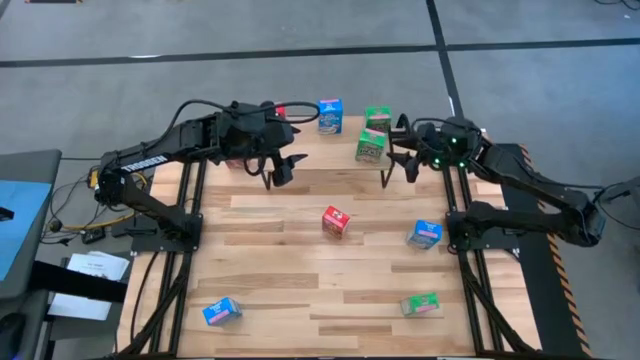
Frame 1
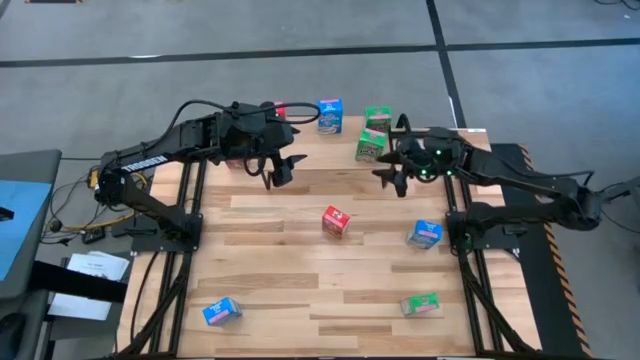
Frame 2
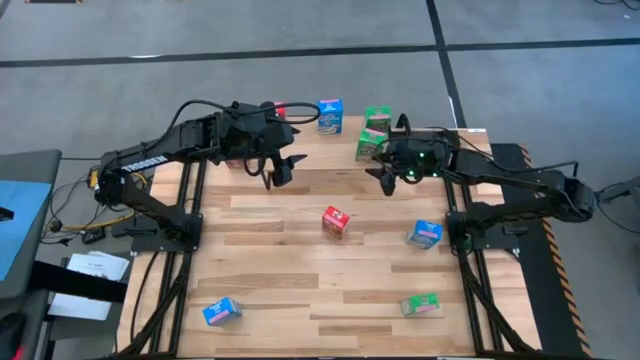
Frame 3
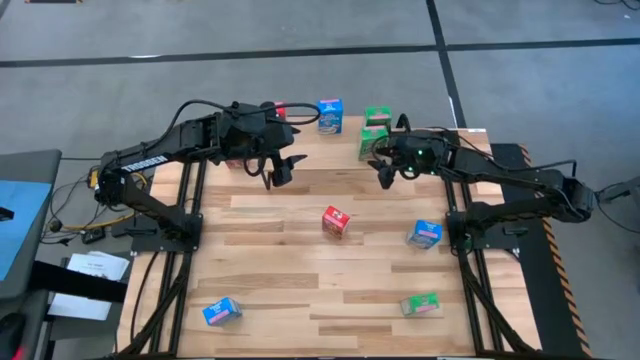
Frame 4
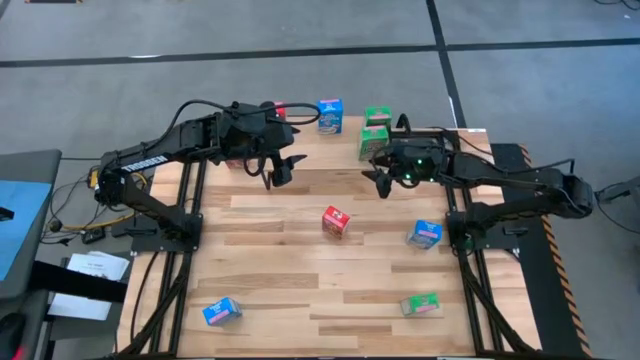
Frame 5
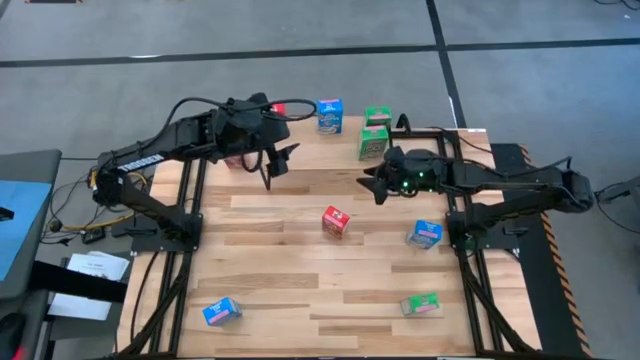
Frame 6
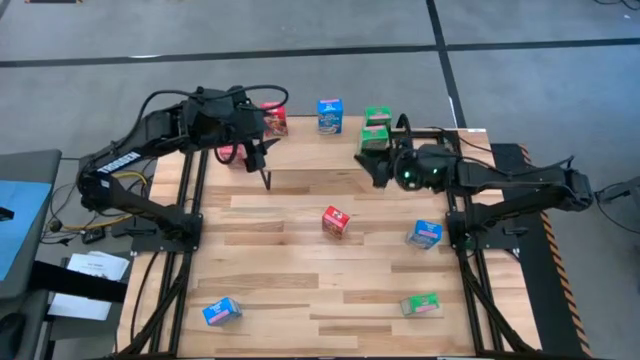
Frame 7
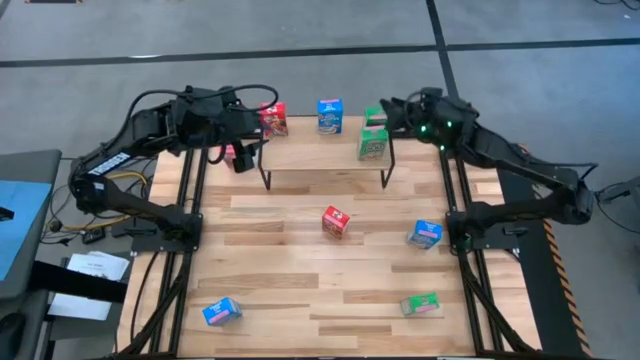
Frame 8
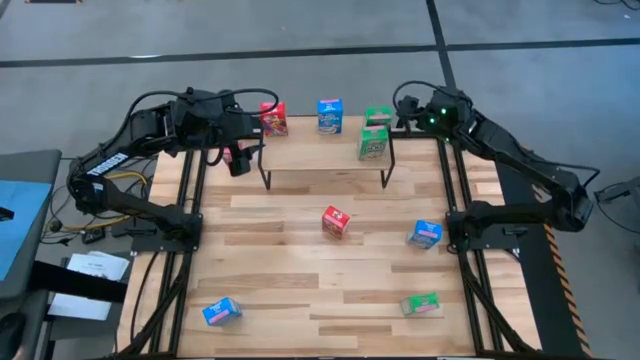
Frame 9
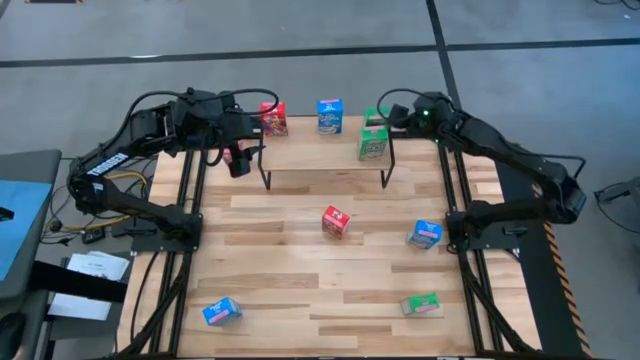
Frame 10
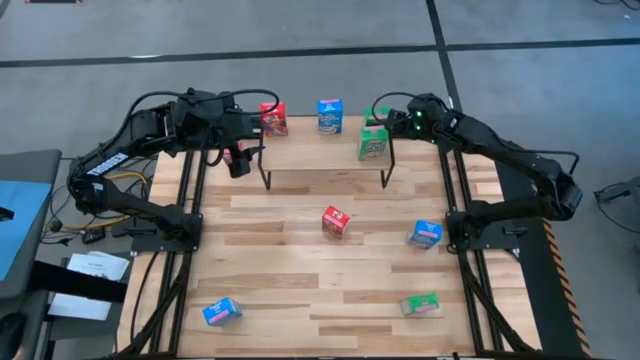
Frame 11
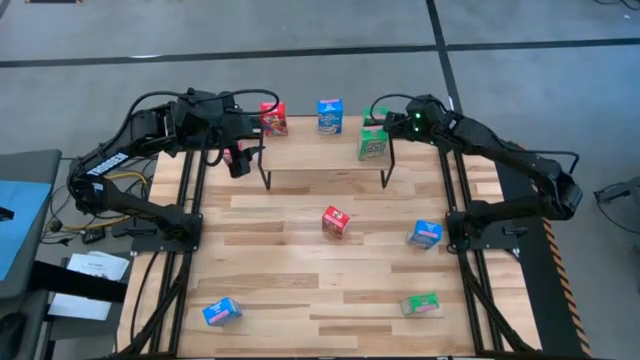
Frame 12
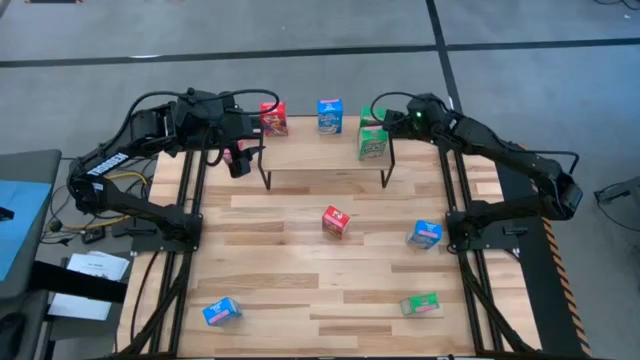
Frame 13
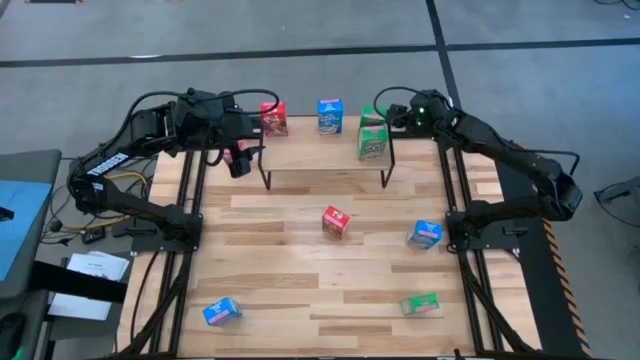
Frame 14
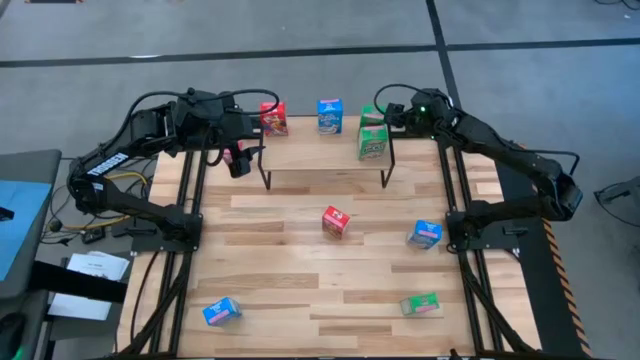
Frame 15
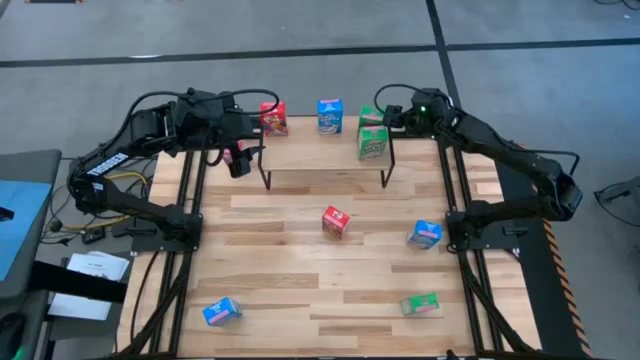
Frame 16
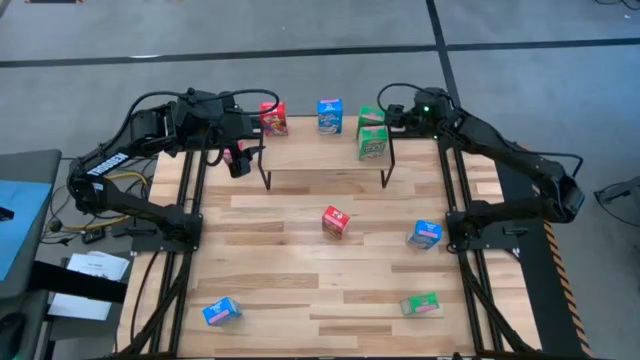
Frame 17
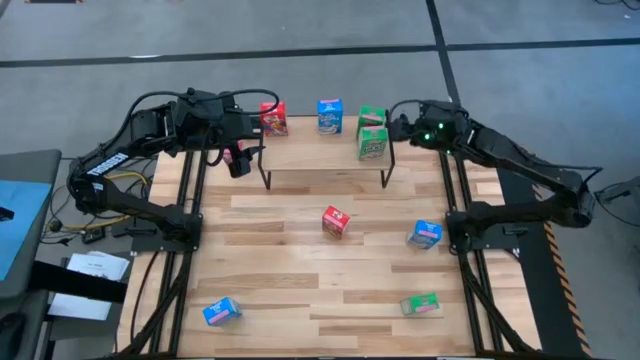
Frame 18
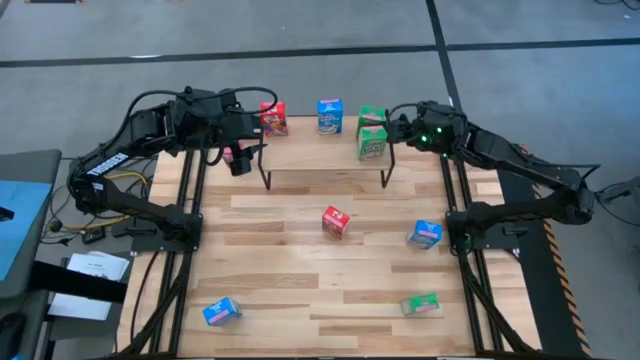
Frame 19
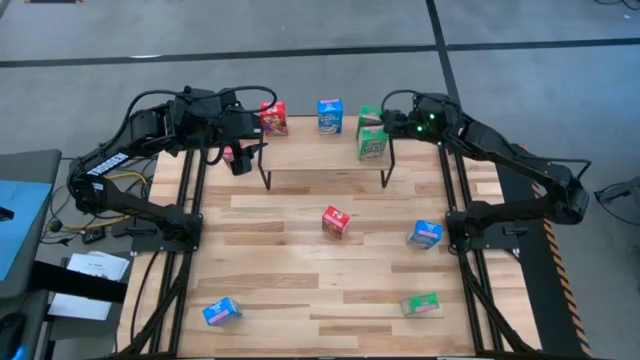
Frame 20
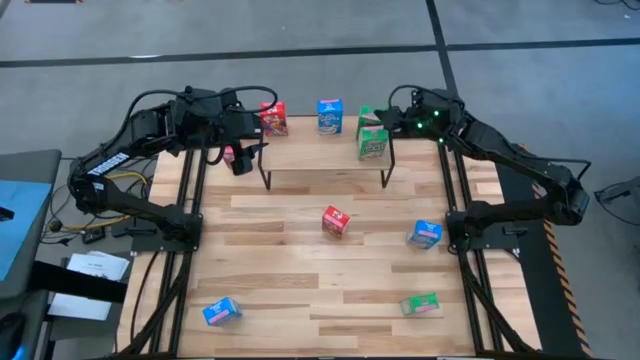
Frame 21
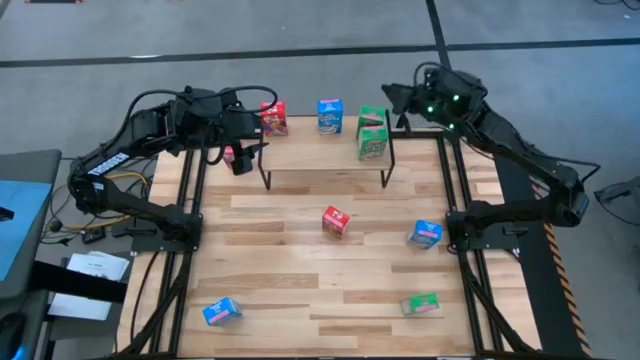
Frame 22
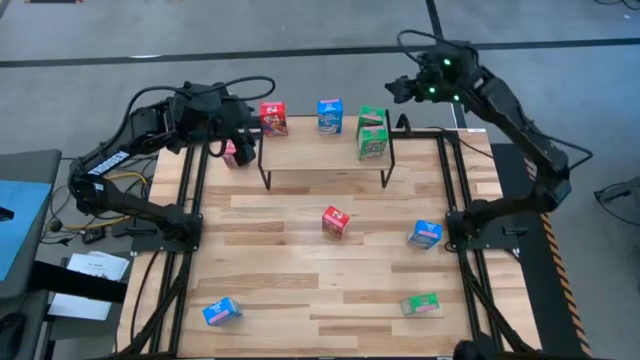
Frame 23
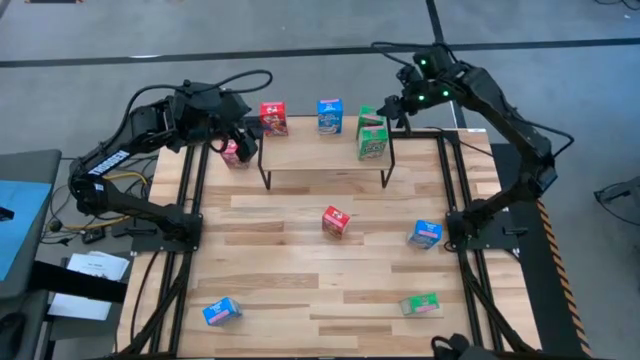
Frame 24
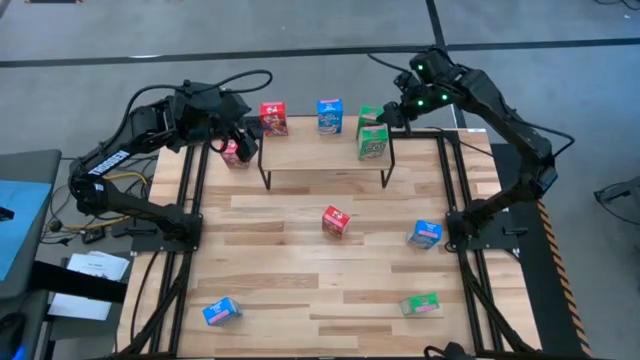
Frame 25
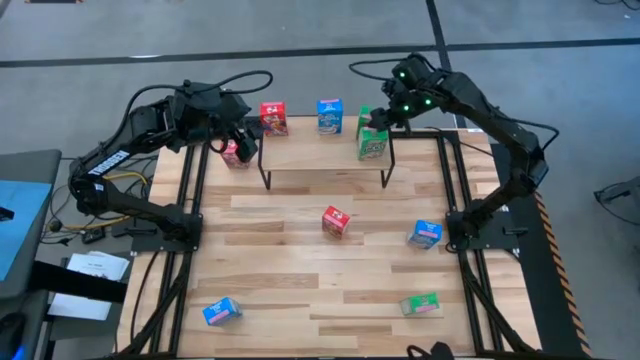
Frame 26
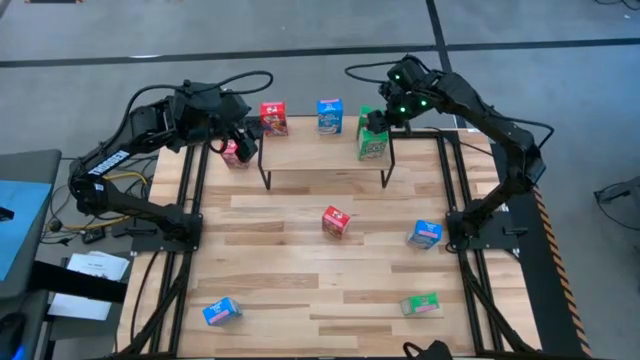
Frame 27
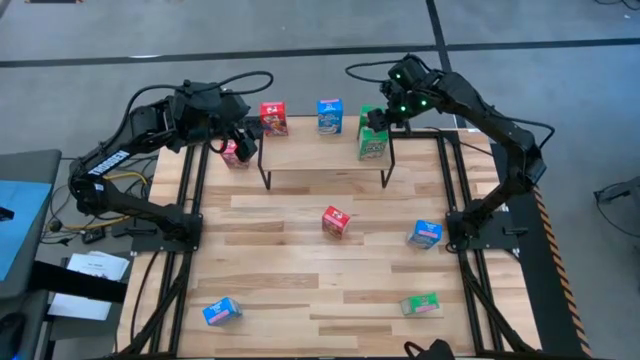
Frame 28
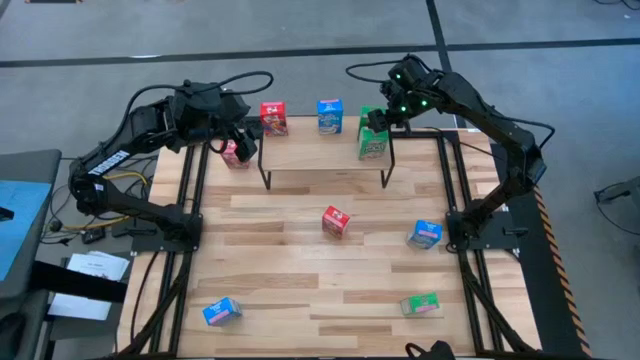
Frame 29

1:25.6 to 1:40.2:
Task: Stack cereal on shelf
Adjust the green cereal boxes on the shelf

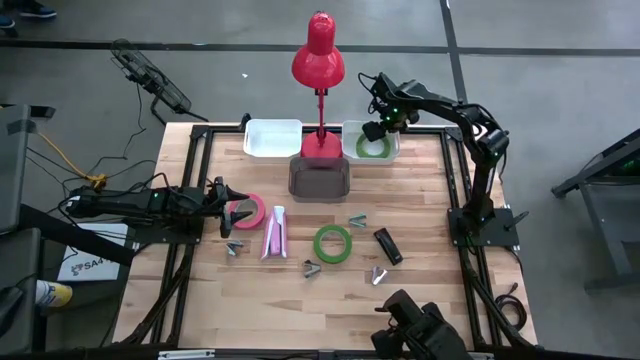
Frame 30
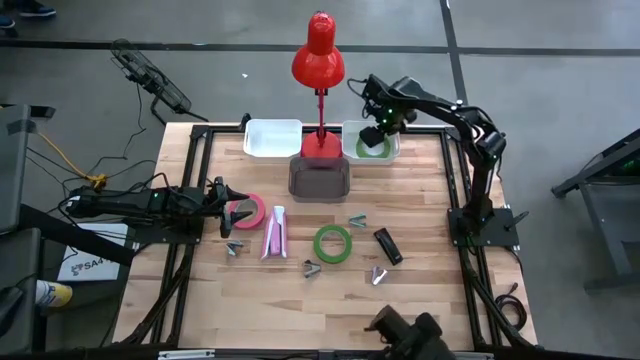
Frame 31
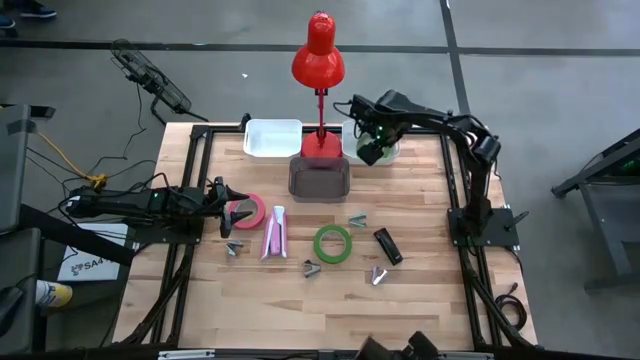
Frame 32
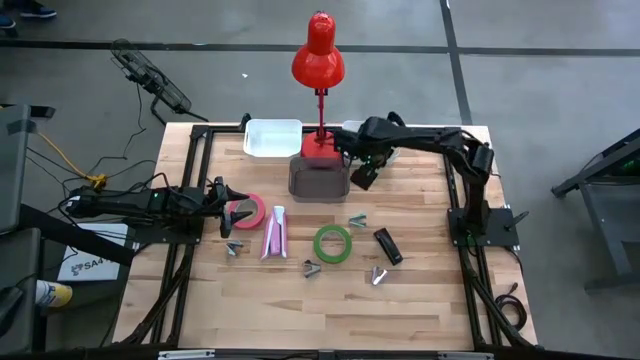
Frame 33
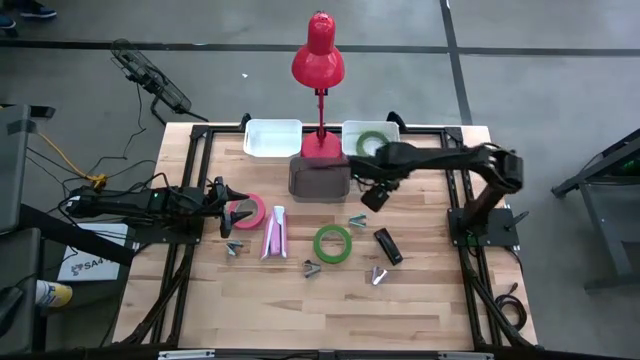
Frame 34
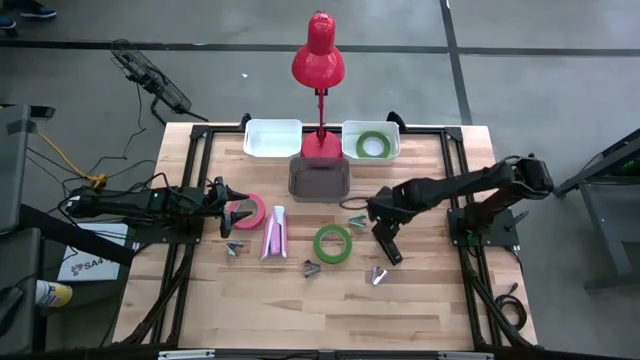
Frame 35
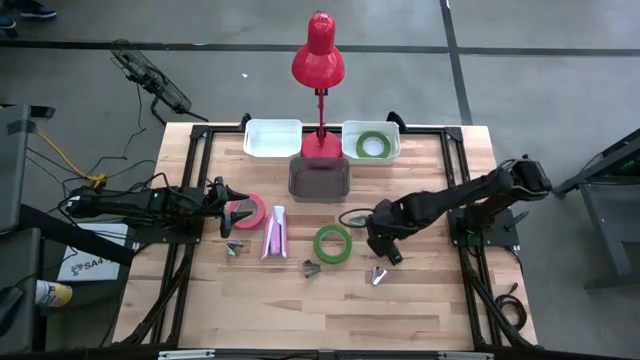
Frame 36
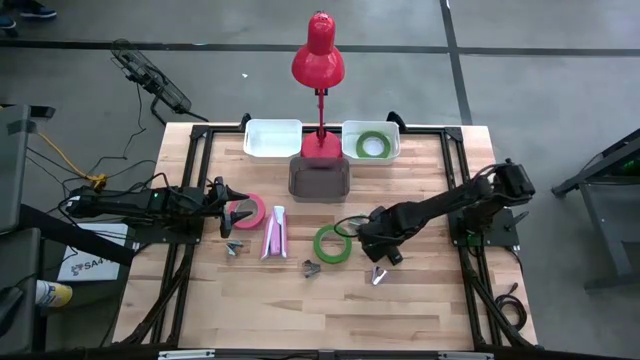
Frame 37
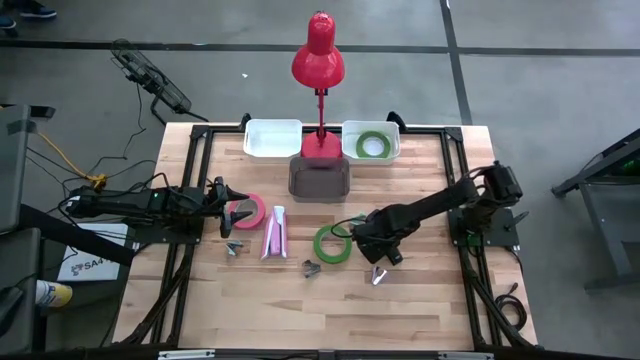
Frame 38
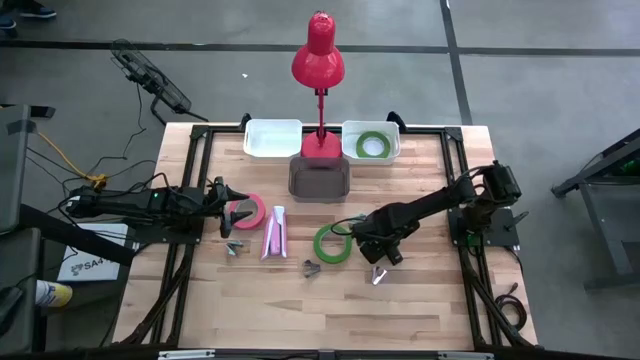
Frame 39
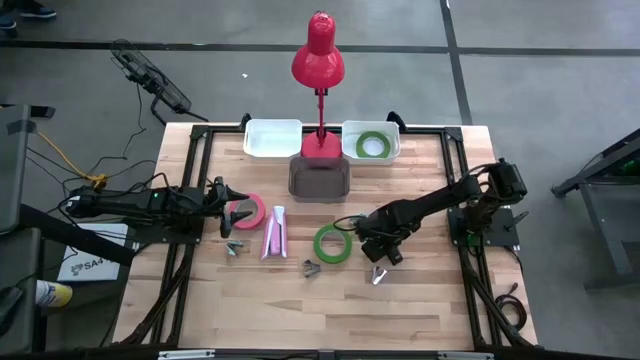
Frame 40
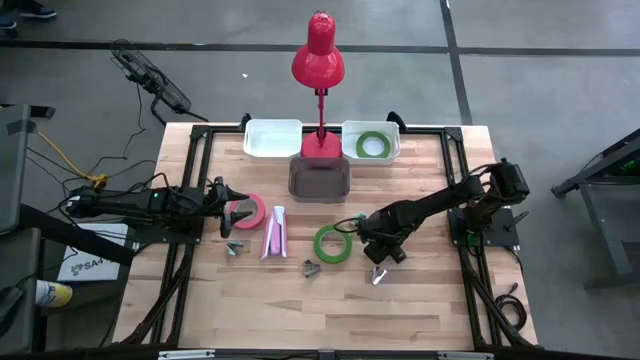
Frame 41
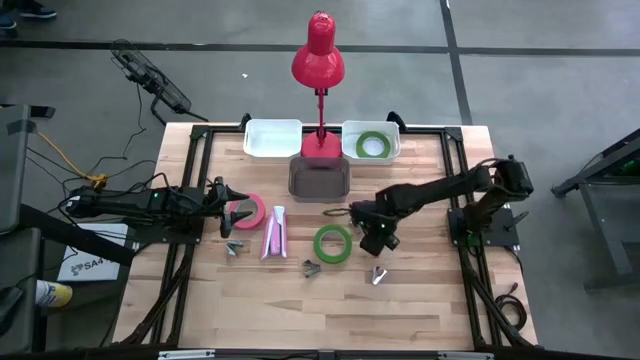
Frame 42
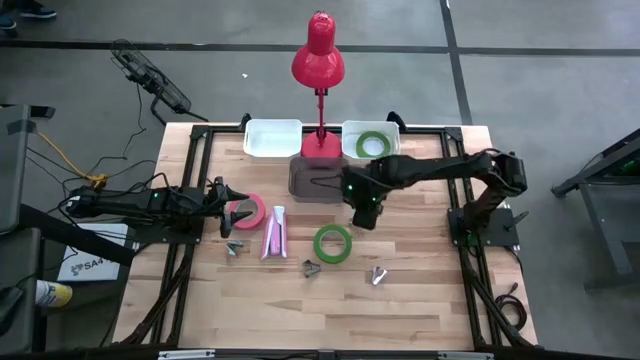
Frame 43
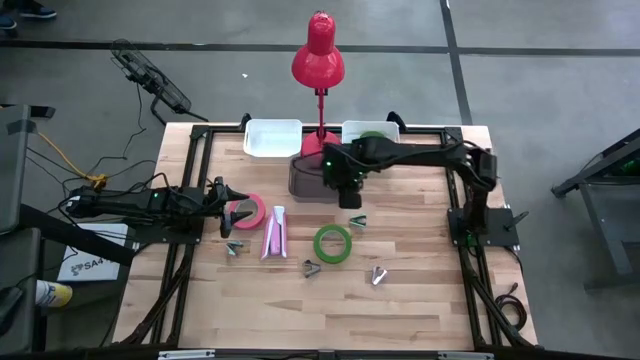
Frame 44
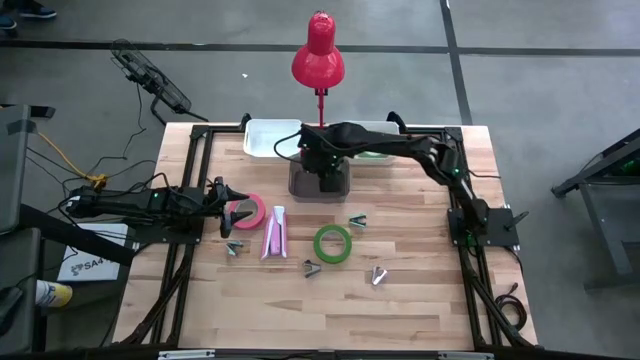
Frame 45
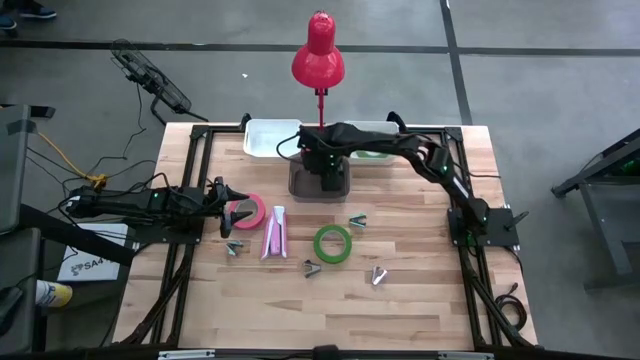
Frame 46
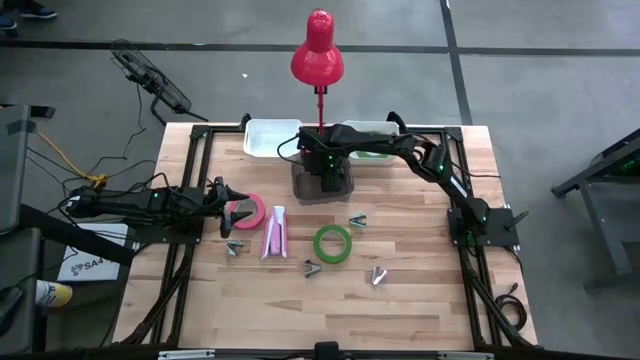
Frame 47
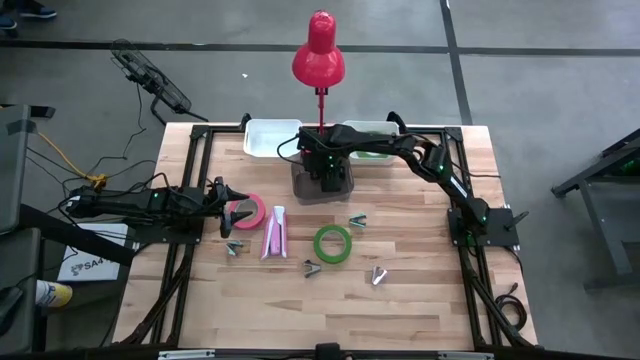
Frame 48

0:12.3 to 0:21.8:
Task: Pick and place Stapler, Stapler remover, tape
Put the black stapler into the black bin
